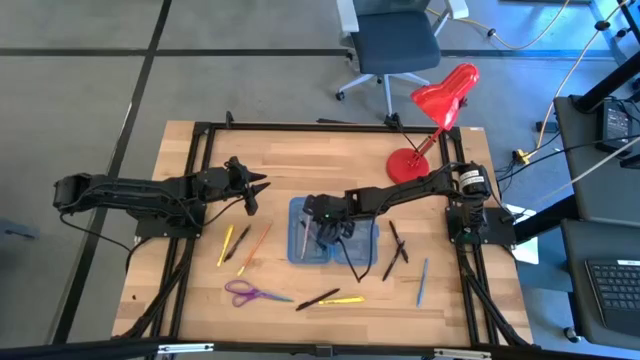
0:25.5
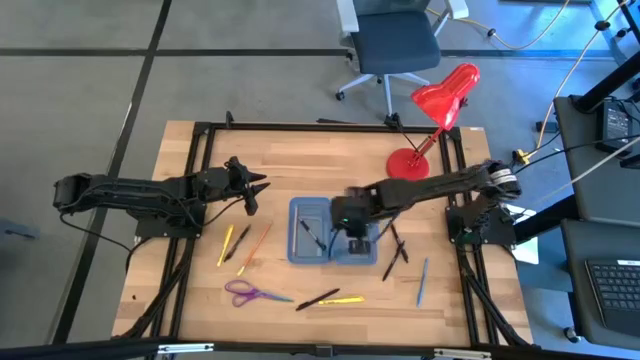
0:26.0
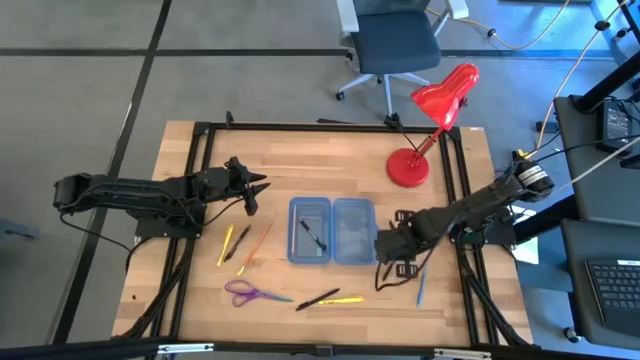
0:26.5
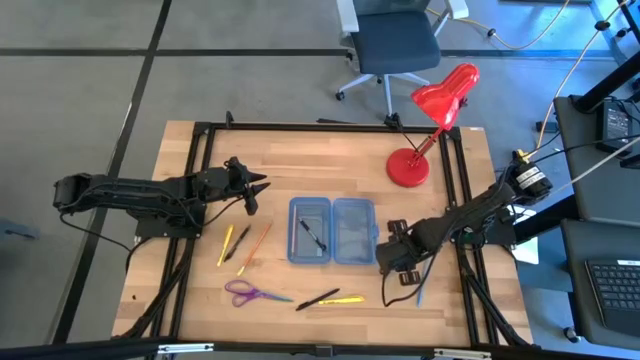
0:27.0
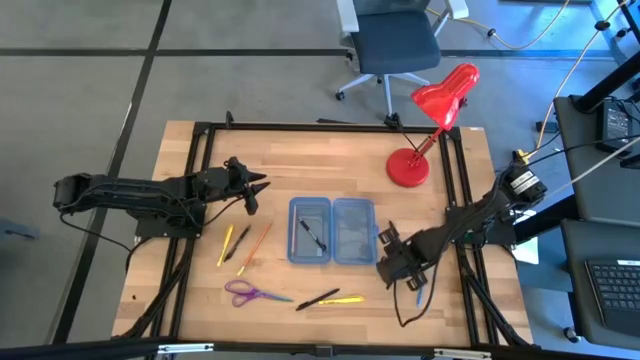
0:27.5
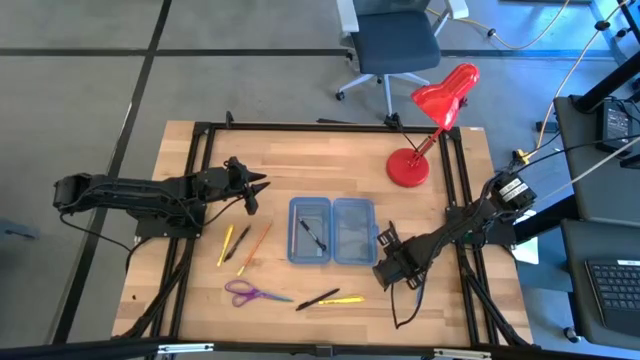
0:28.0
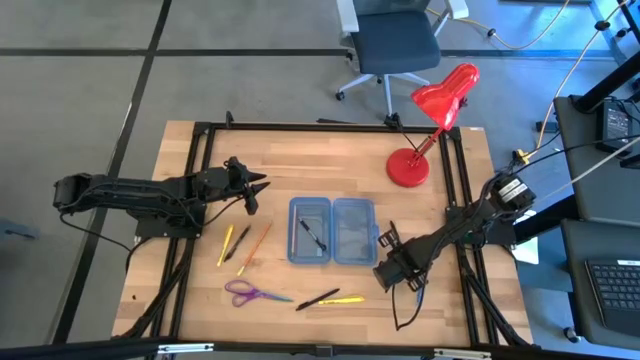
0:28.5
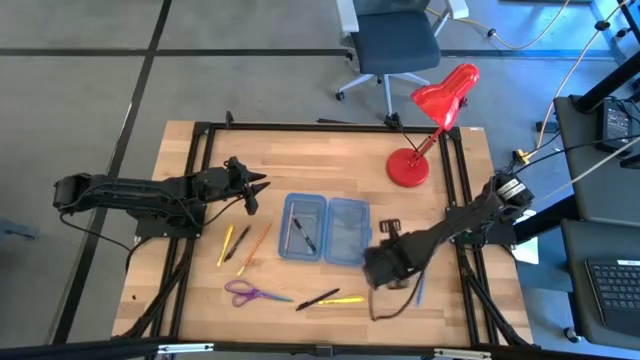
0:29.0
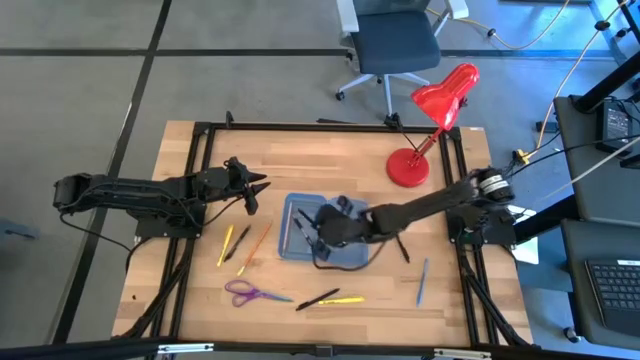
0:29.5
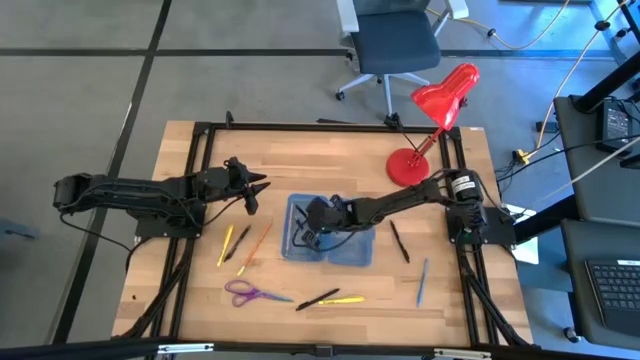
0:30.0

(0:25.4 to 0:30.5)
Task: Pick & place school supplies into a supply box
Put the black pen into the blue supply box

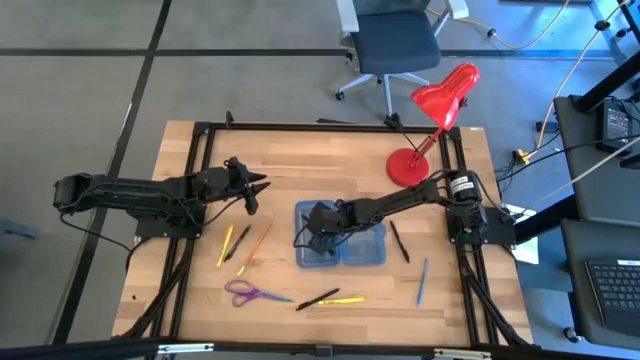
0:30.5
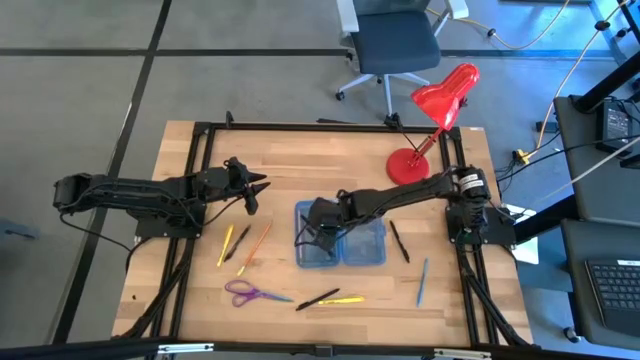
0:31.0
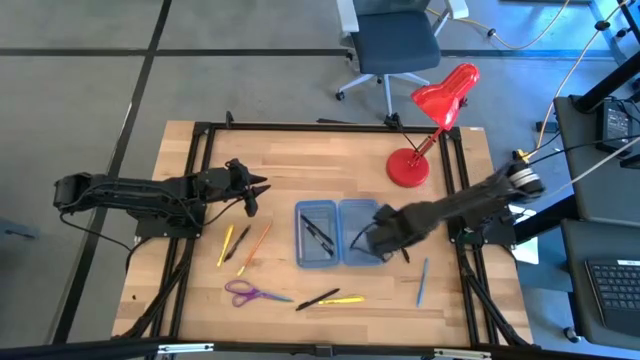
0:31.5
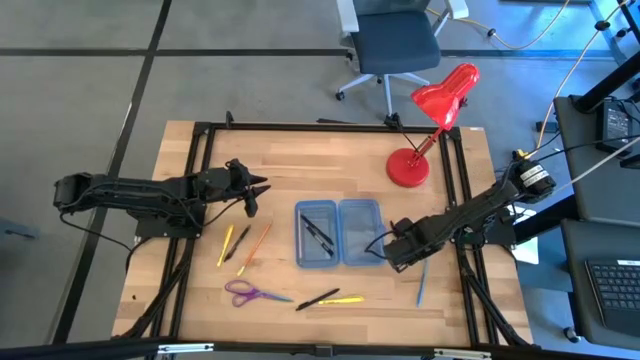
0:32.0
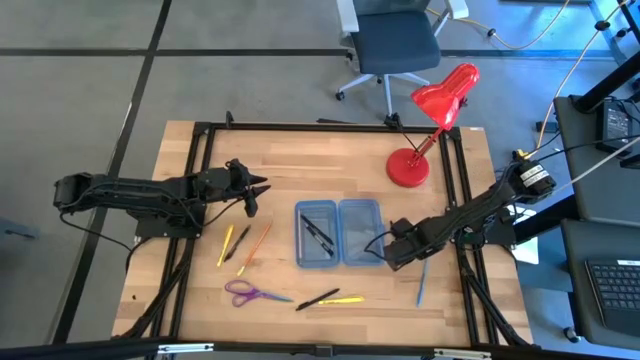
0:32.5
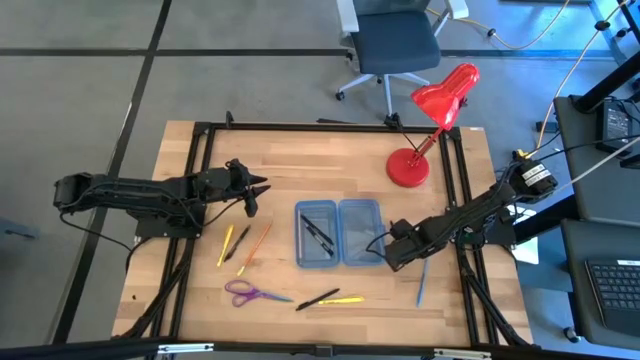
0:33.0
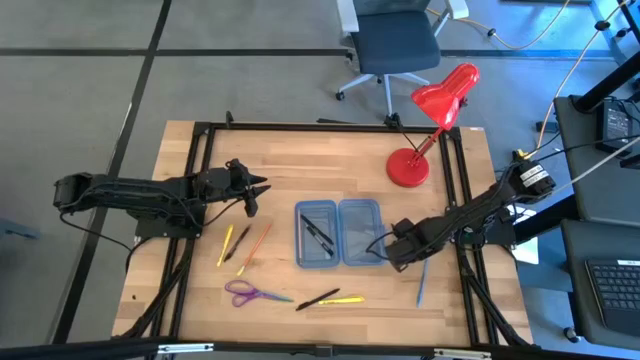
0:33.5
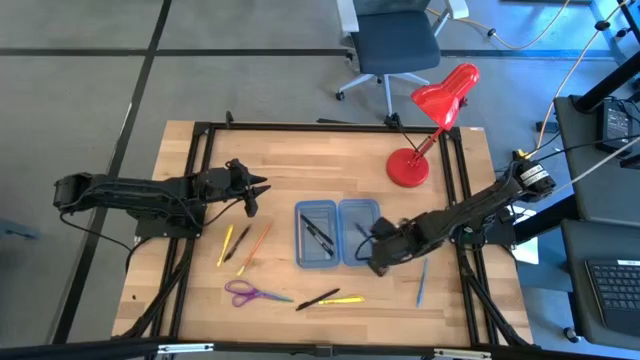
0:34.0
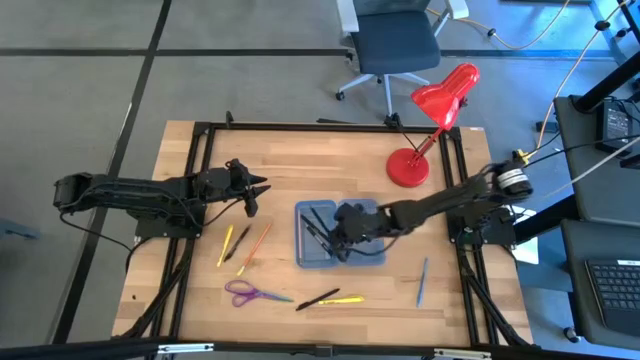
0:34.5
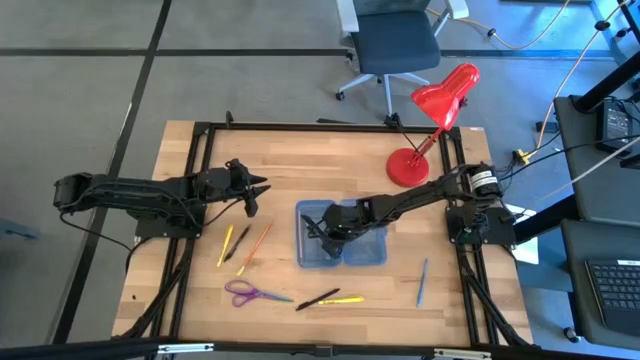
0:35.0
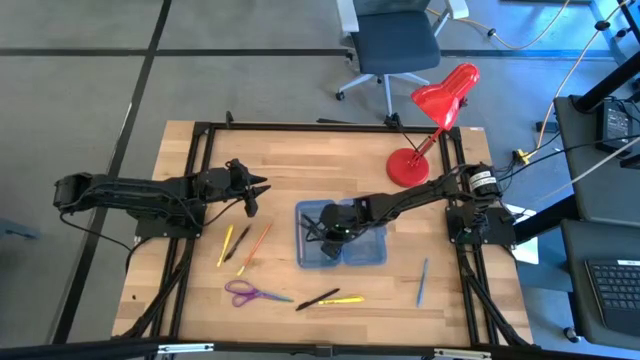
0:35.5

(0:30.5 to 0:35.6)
Put the black pen into the blue supply box

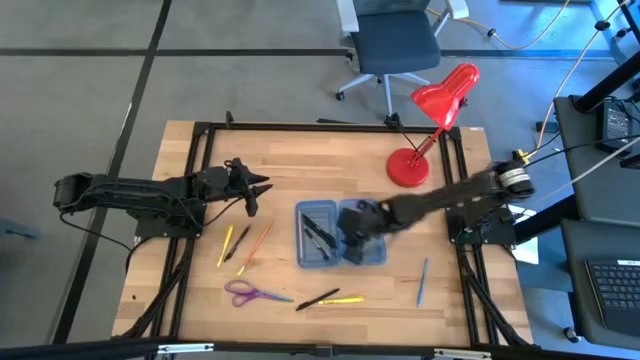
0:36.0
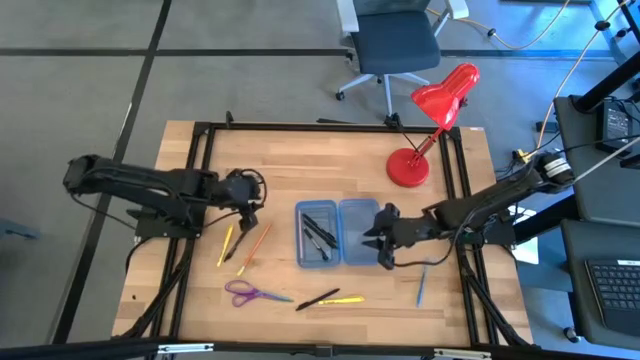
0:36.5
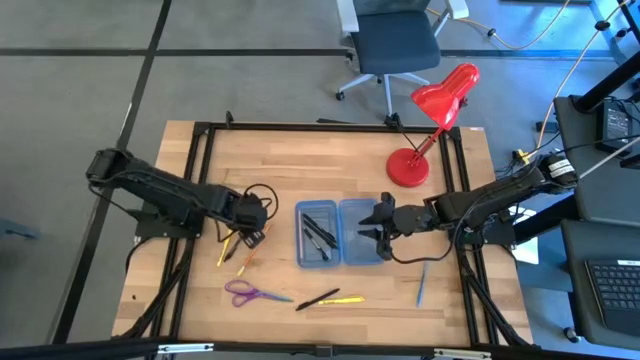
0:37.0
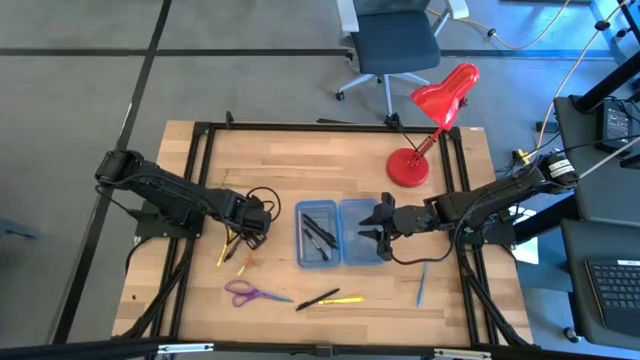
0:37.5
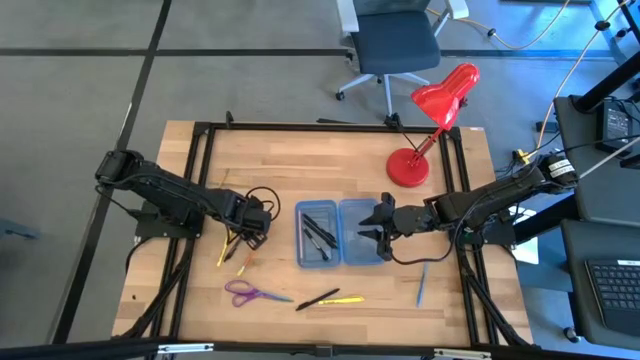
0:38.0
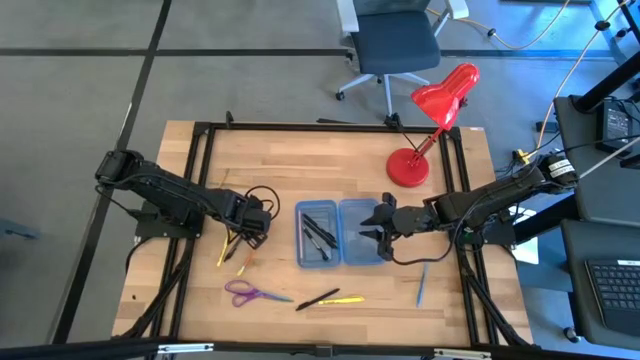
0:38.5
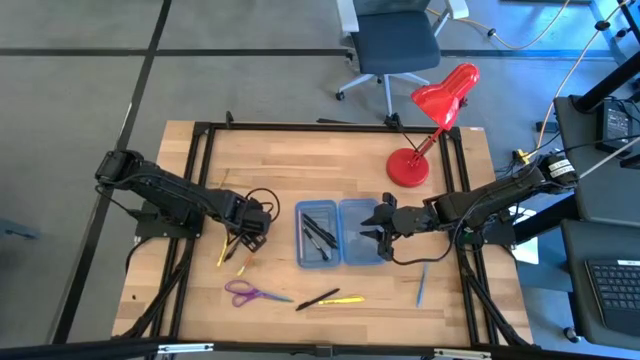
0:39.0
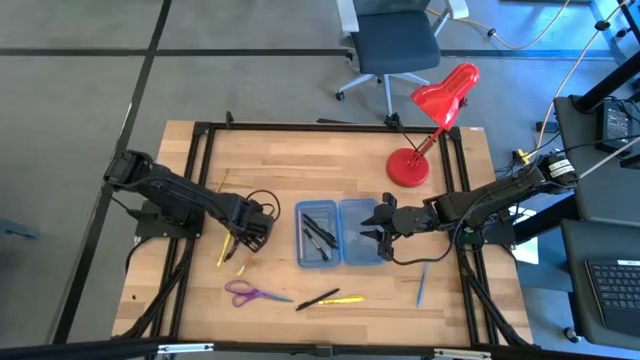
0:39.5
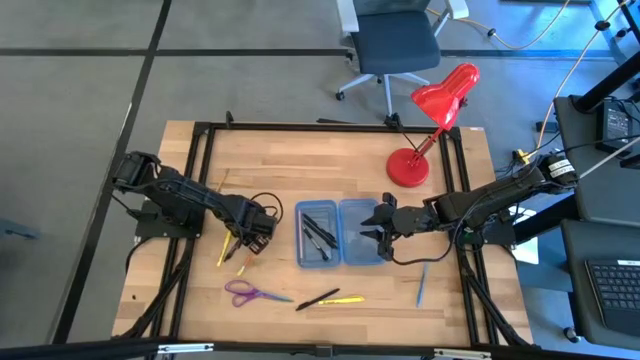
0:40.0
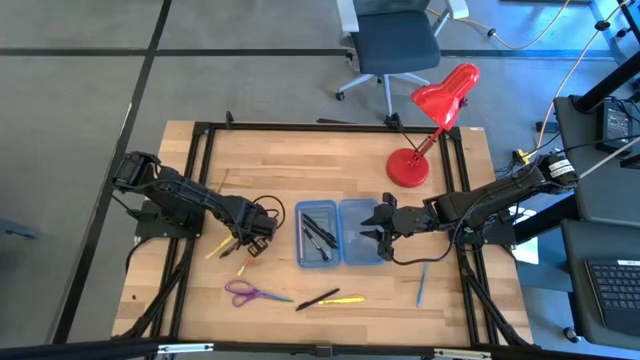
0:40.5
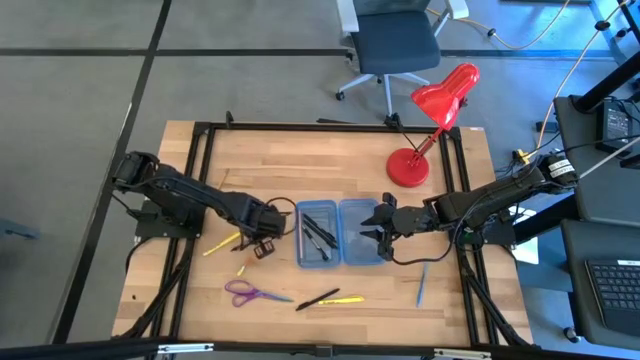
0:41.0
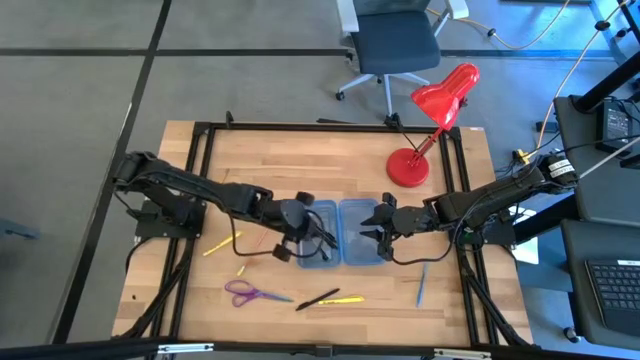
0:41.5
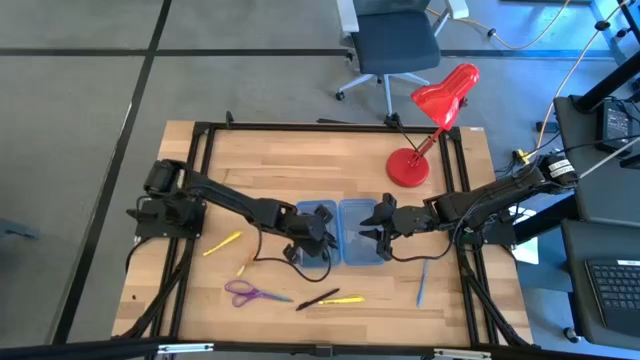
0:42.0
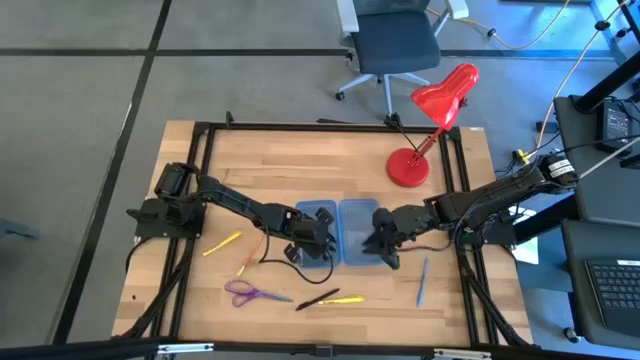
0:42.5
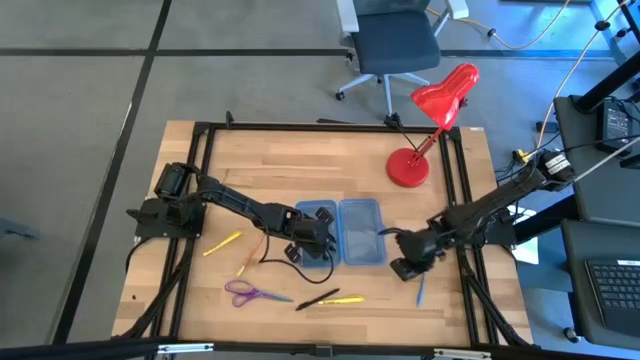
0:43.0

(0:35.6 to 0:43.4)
Put the black pen into the blue supply box

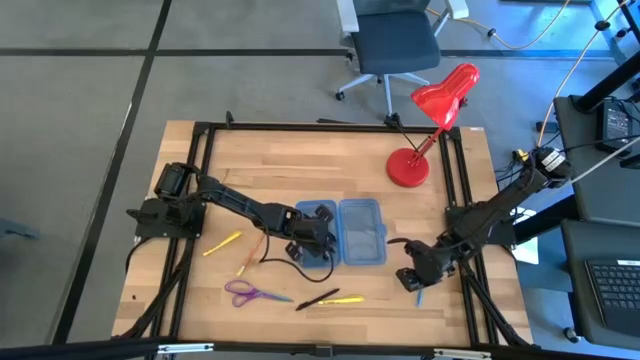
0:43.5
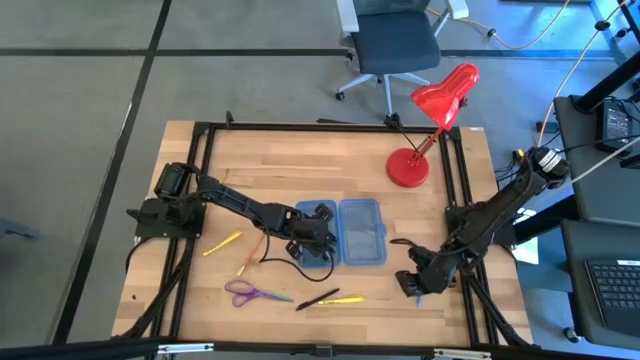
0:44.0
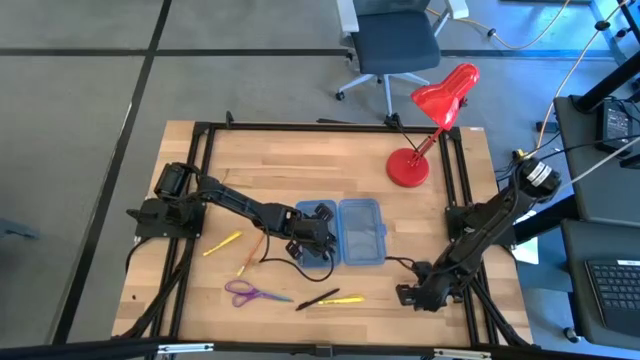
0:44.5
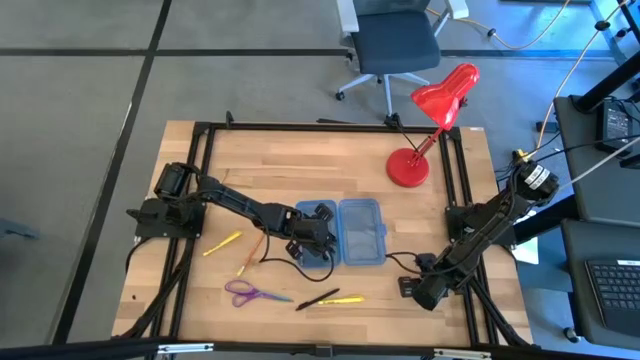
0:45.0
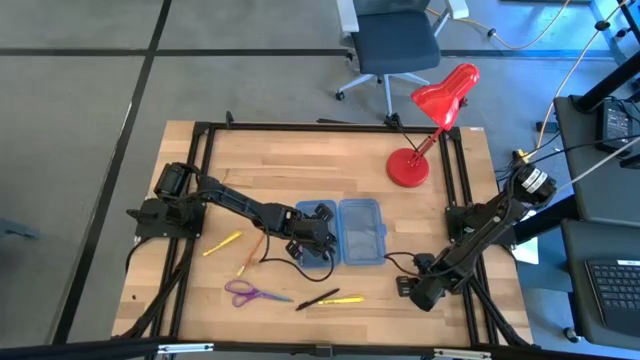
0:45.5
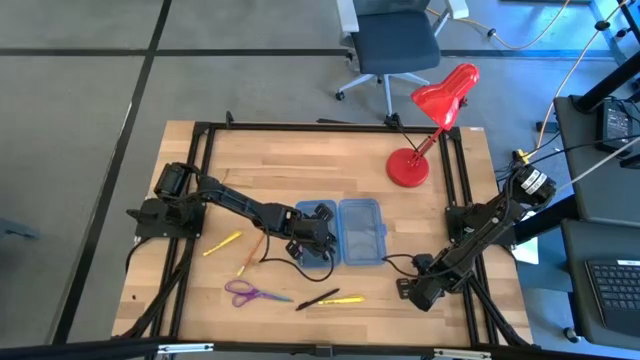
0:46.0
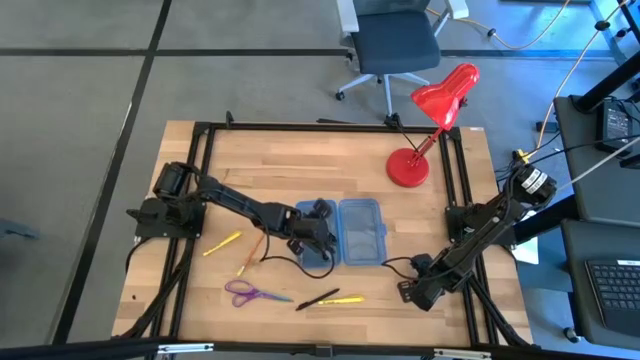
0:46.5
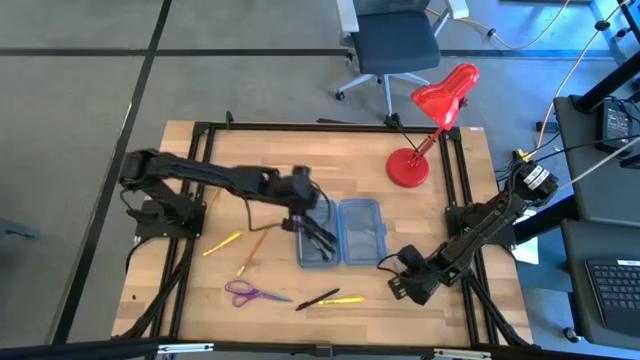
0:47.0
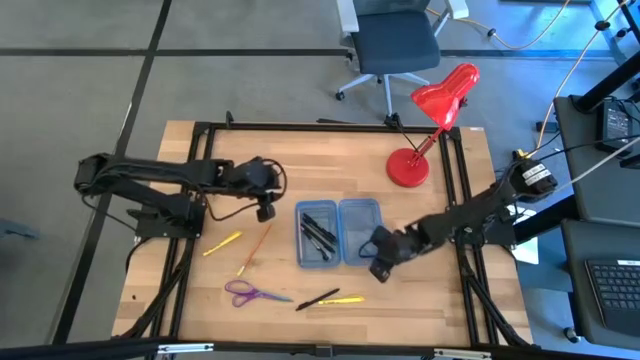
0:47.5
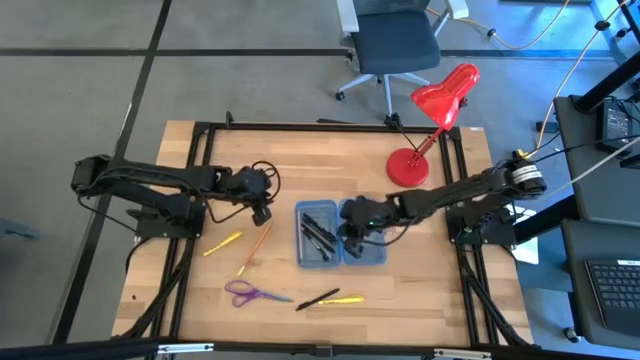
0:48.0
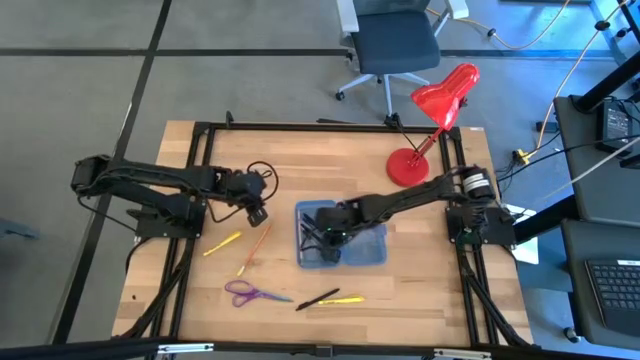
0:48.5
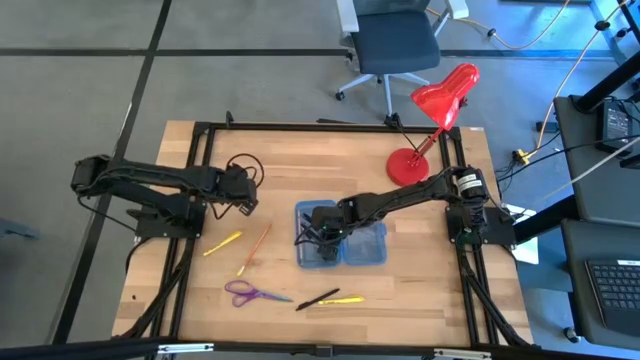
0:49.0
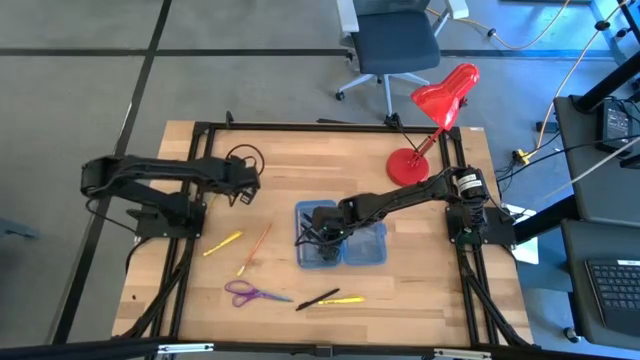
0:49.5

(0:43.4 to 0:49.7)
Put the blue pen into the blue supply box
